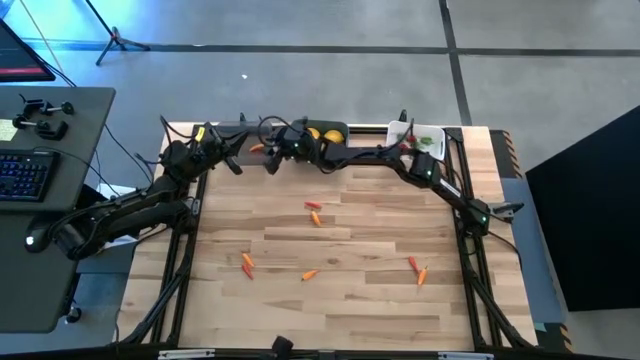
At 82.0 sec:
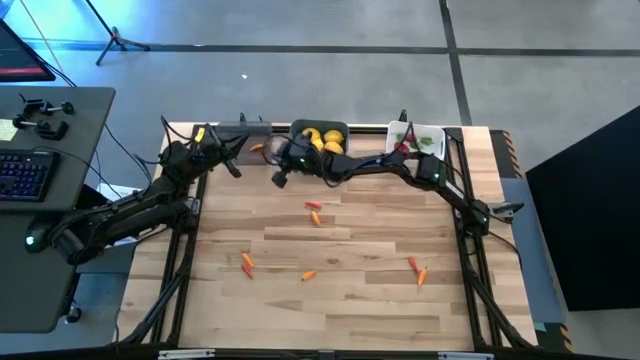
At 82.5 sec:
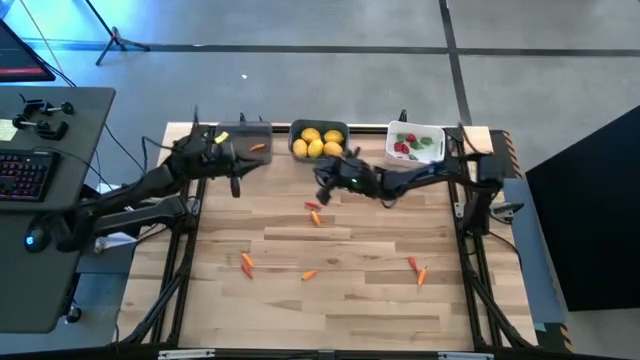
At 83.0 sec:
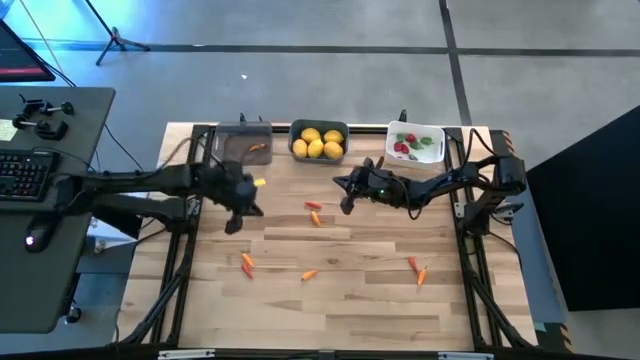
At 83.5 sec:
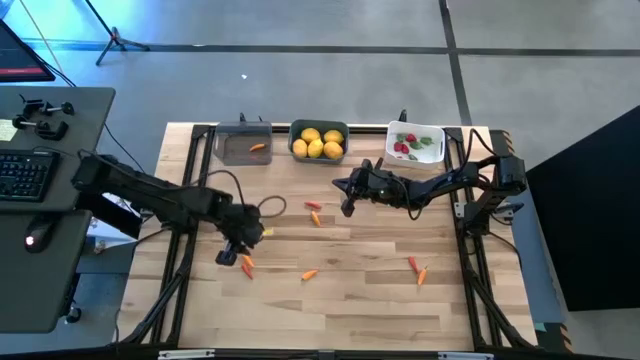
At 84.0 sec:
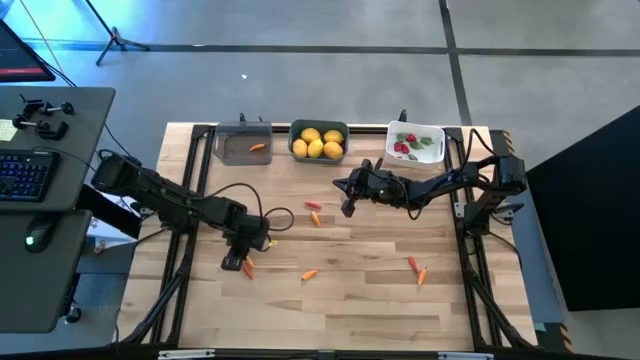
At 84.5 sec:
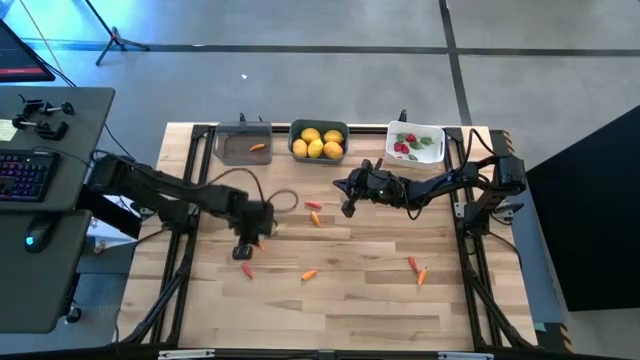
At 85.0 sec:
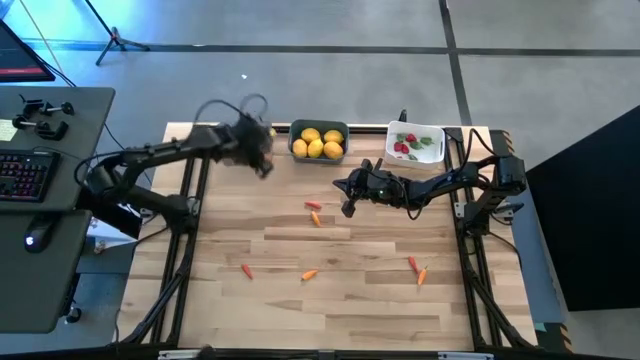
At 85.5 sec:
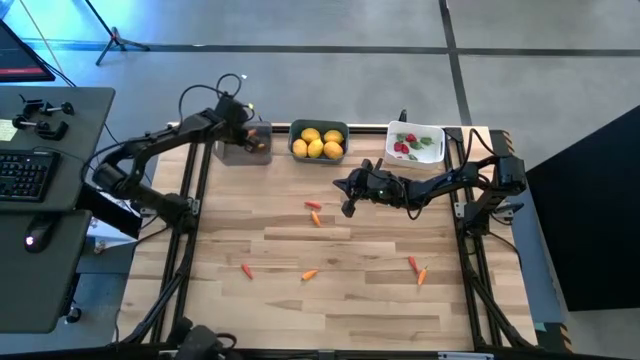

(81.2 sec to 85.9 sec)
Task: Sort produce into baskets
Put the yellow chili pepper into the transparent black bin

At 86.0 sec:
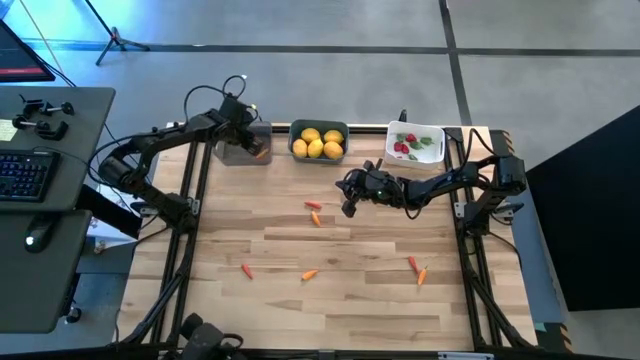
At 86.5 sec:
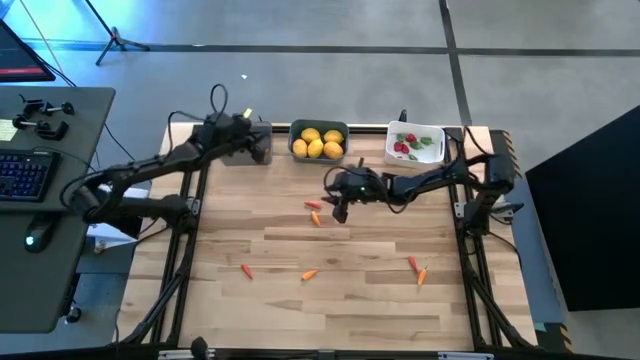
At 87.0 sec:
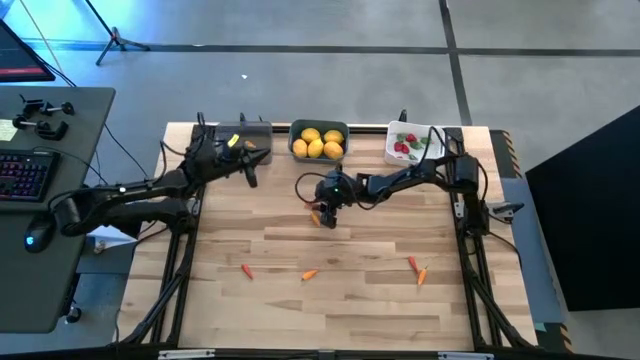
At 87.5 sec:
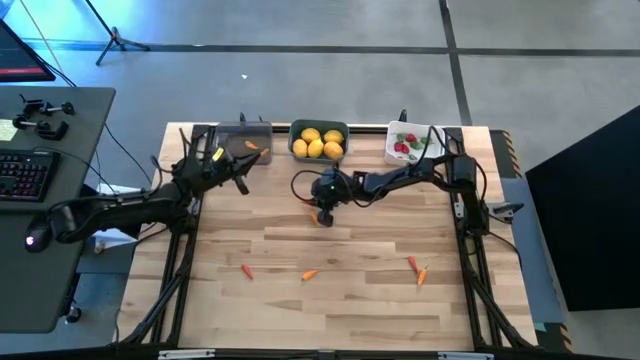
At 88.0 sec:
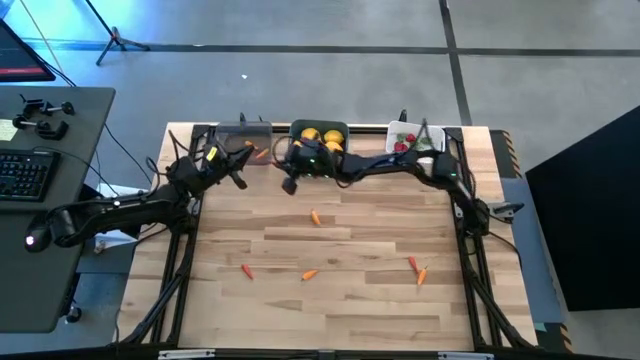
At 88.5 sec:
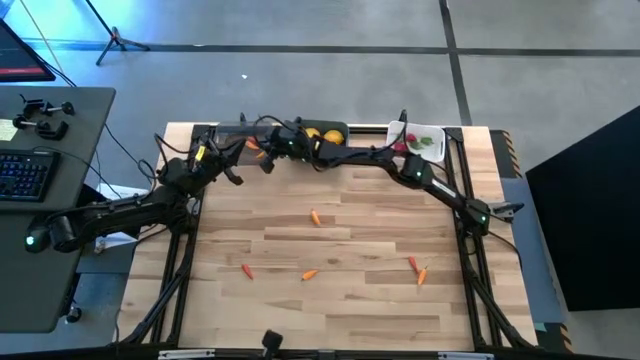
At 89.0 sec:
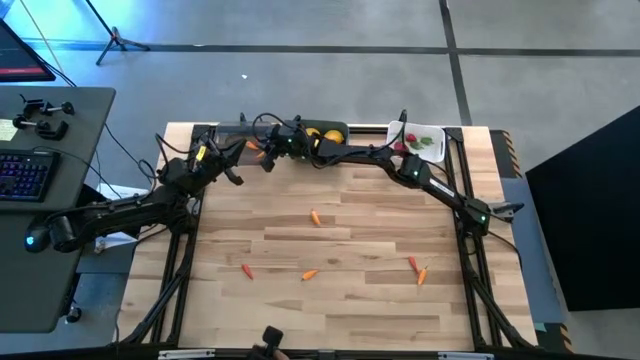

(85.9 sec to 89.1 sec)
Put the orange chili pepper into the transparent black bin

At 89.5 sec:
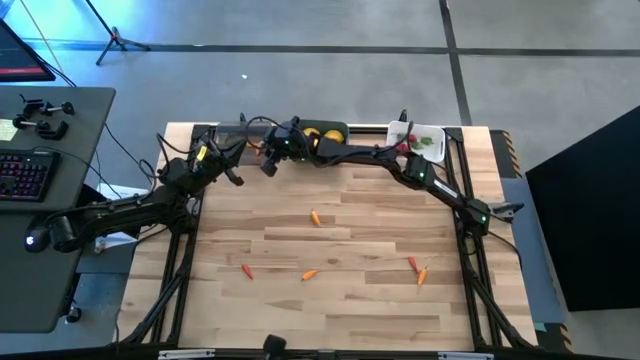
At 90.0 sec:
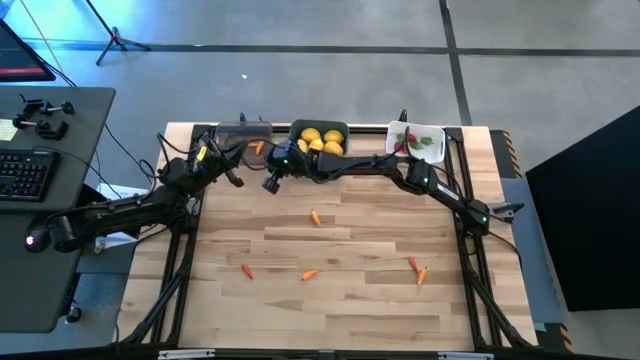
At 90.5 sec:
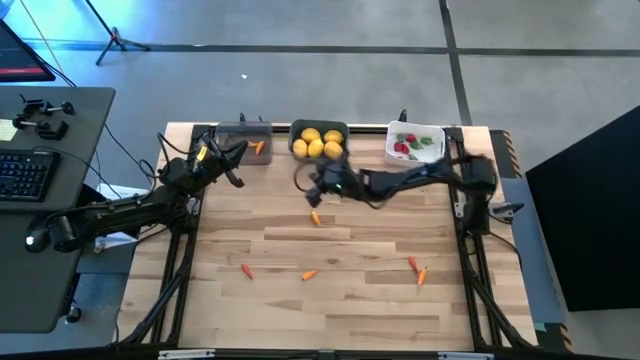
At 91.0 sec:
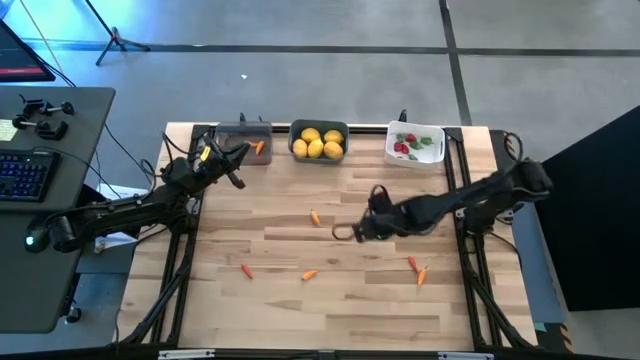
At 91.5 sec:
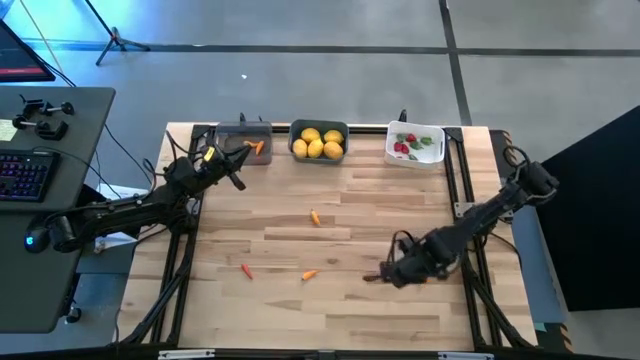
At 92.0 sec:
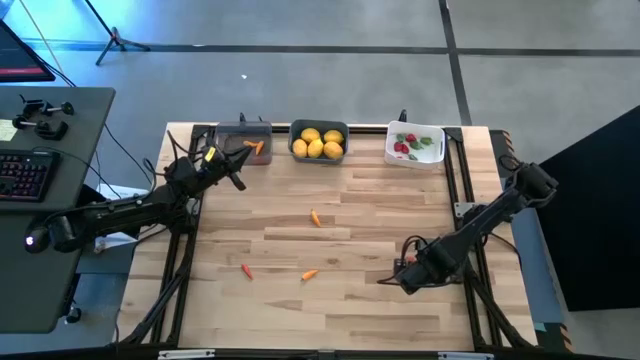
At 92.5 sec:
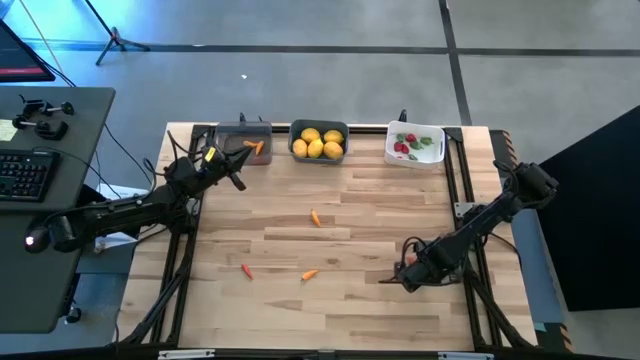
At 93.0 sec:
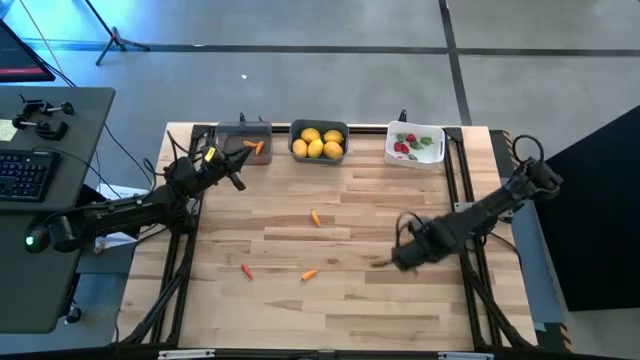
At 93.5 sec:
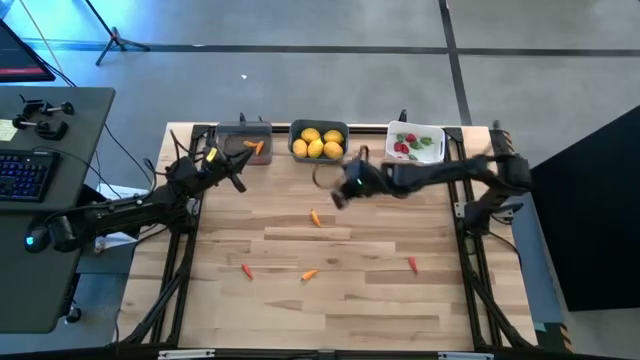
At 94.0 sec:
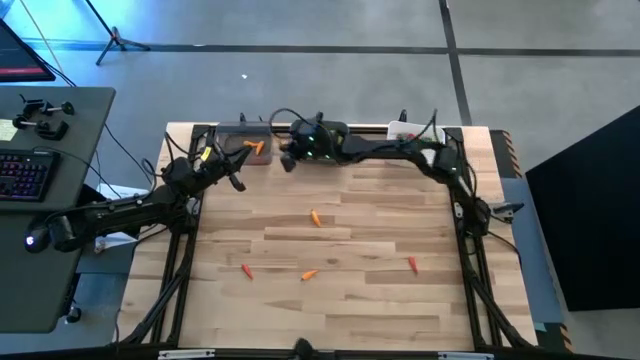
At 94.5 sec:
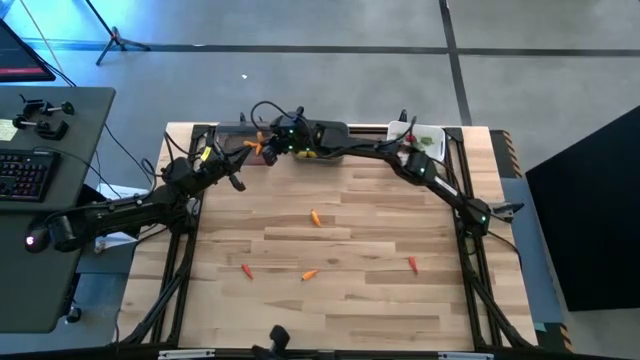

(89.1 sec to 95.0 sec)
Put the yellow chili pepper into the transparent black bin

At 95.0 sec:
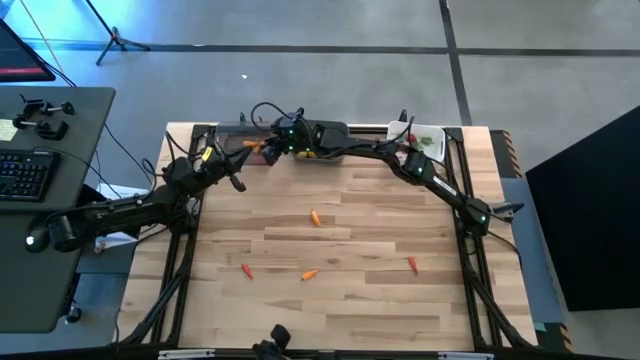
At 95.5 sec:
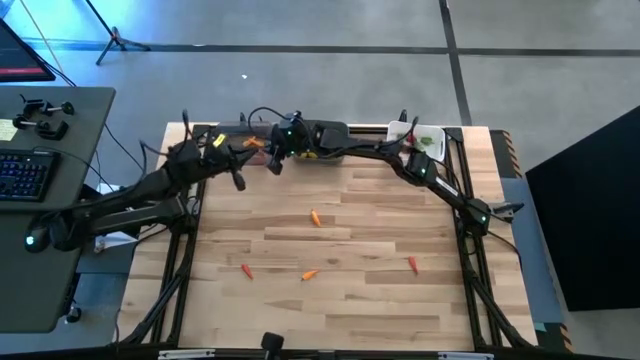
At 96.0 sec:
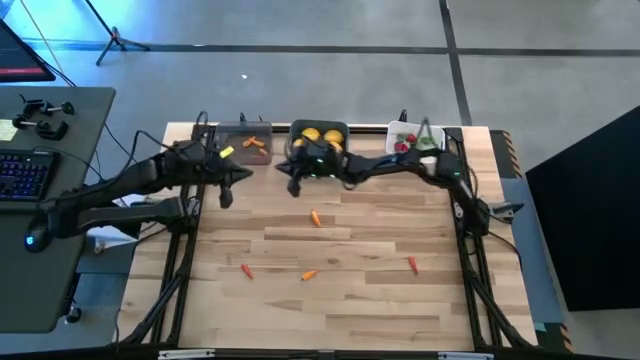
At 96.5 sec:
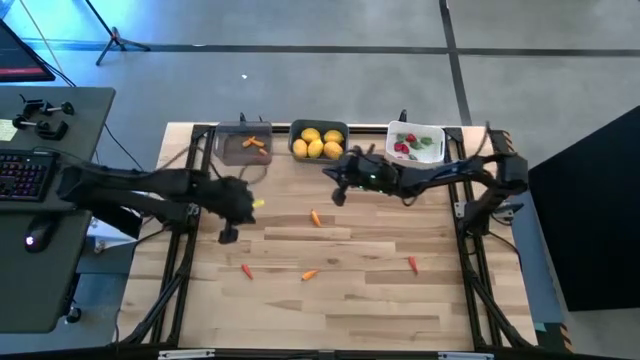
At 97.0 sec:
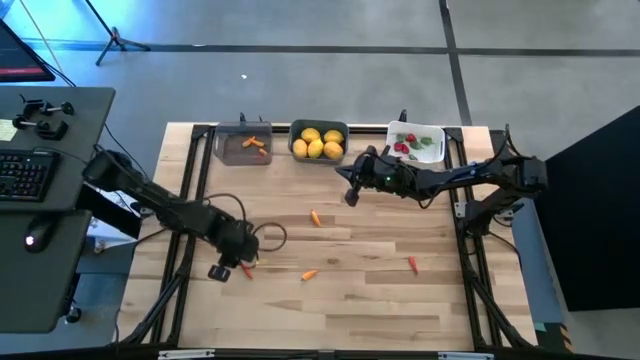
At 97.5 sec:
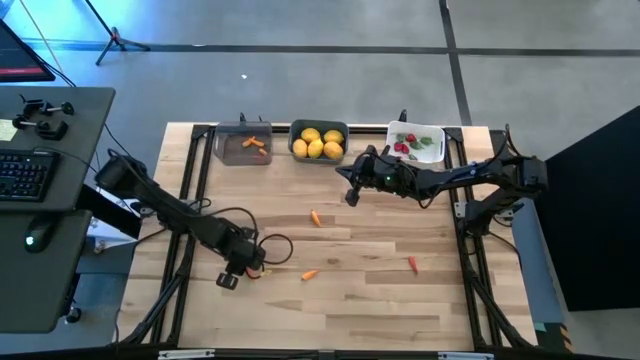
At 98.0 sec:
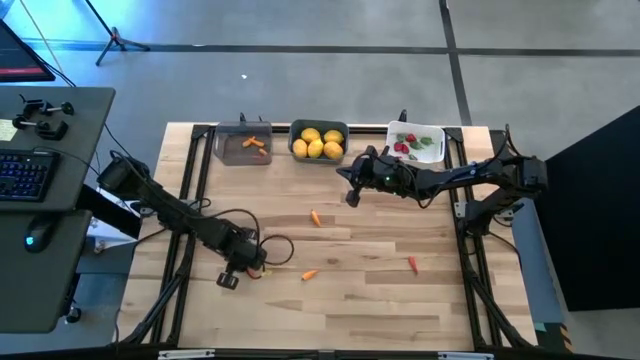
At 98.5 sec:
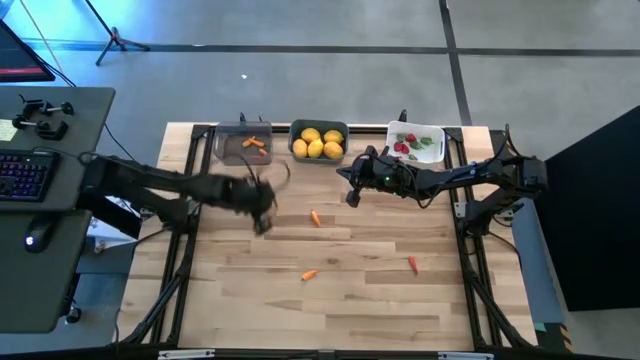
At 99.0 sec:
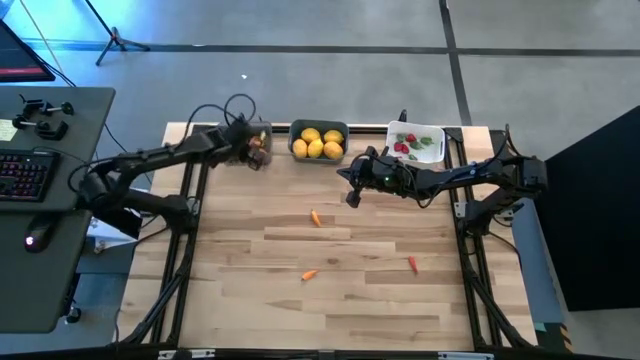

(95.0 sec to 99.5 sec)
Put the orange chili pepper into the transparent black bin

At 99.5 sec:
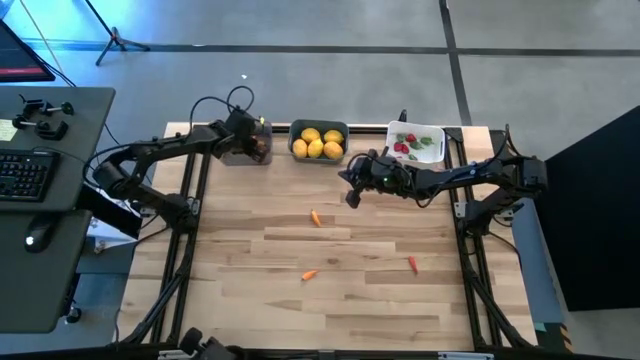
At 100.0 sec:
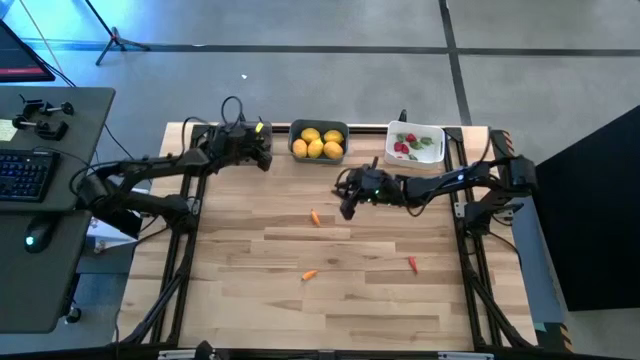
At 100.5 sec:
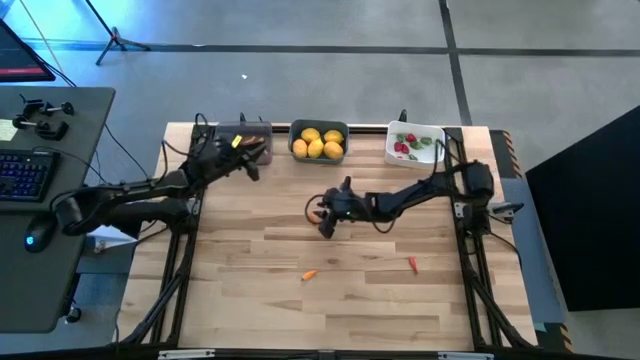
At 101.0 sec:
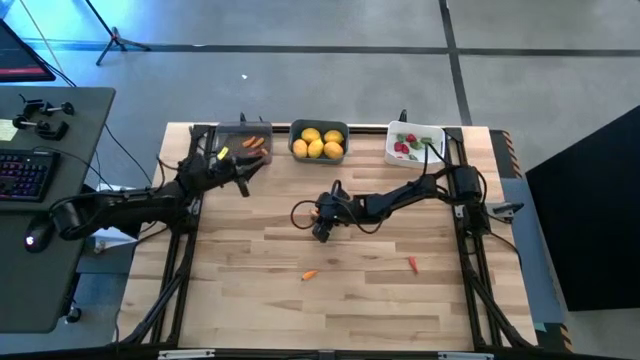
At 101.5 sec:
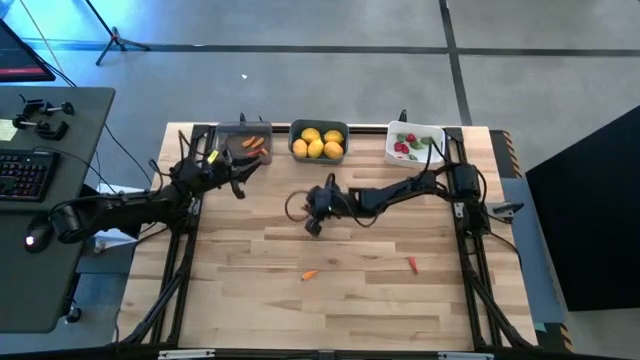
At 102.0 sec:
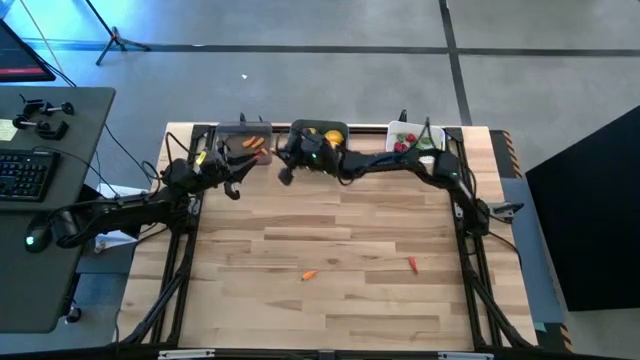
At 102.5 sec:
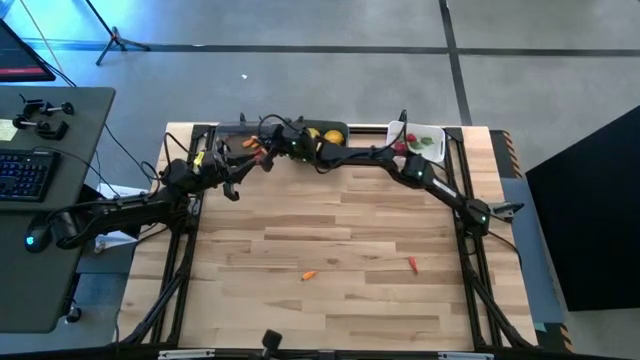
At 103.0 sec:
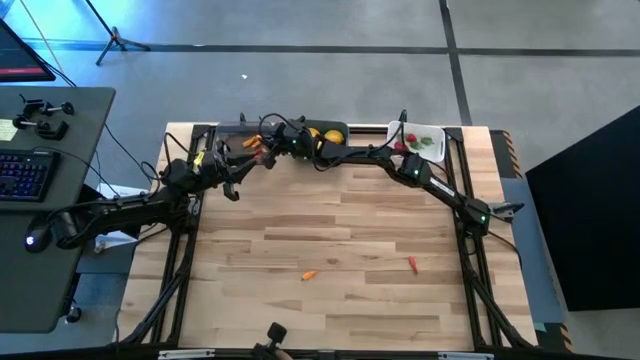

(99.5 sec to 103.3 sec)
Put the yellow chili pepper into the transparent black bin
